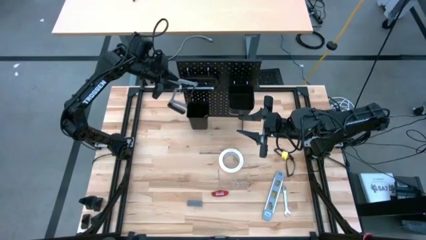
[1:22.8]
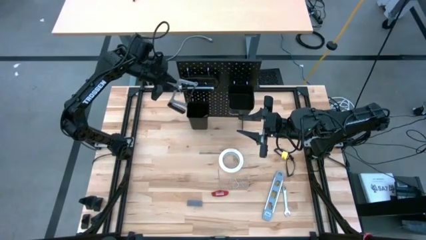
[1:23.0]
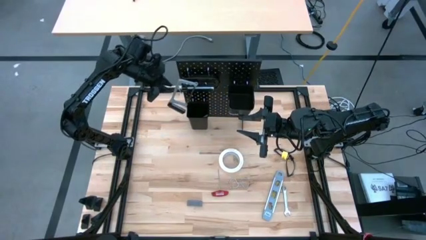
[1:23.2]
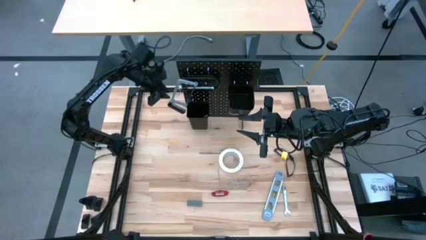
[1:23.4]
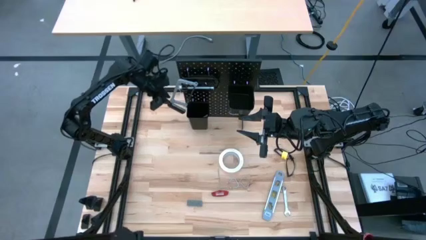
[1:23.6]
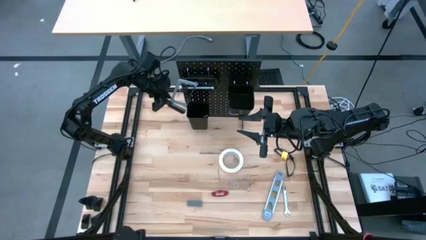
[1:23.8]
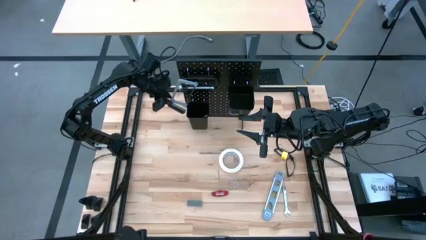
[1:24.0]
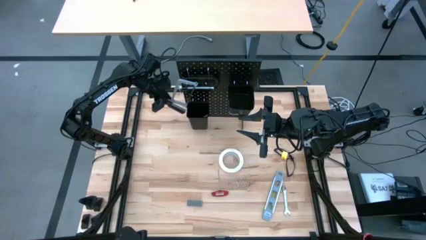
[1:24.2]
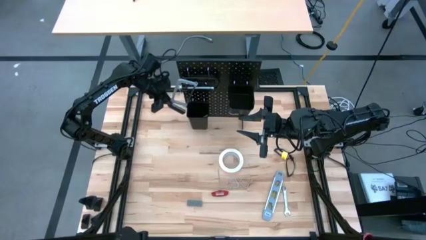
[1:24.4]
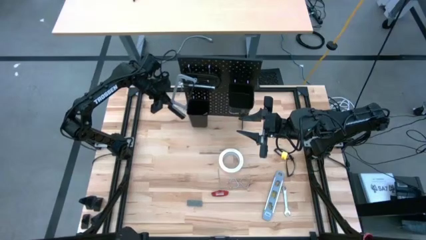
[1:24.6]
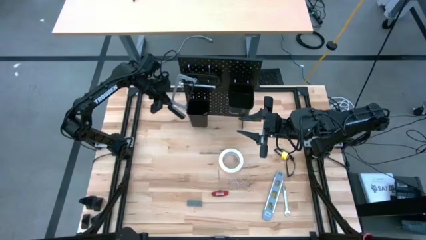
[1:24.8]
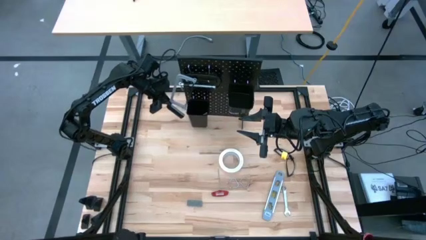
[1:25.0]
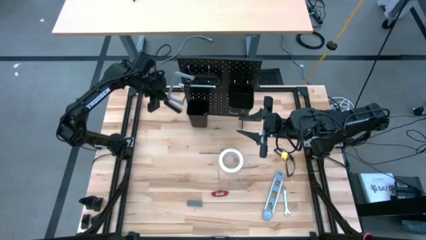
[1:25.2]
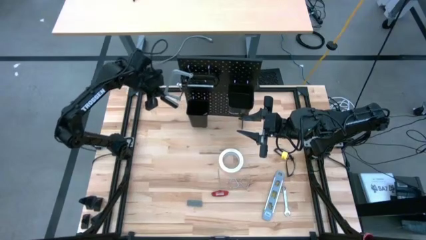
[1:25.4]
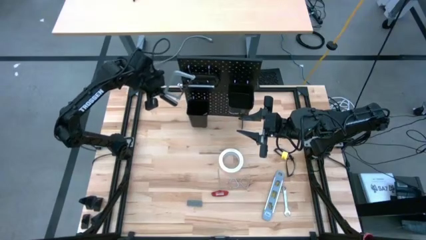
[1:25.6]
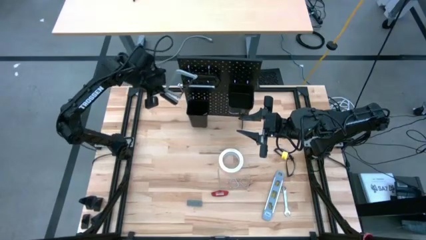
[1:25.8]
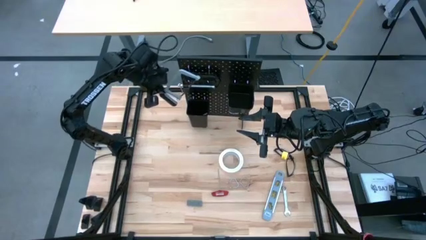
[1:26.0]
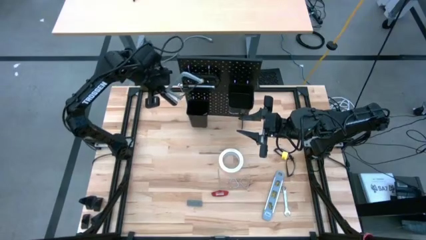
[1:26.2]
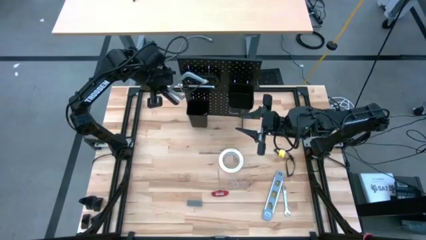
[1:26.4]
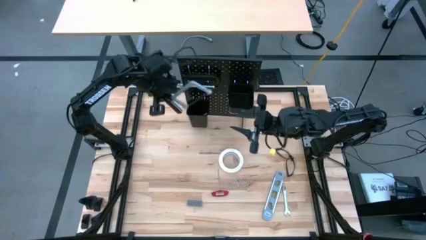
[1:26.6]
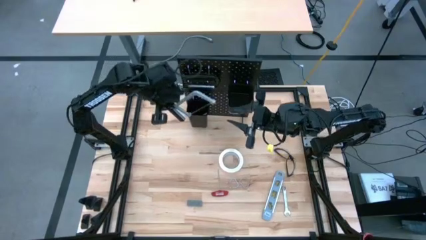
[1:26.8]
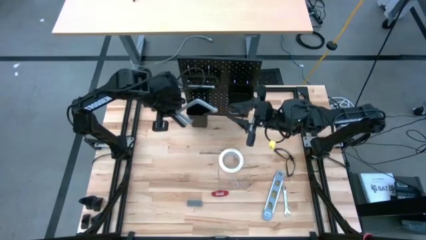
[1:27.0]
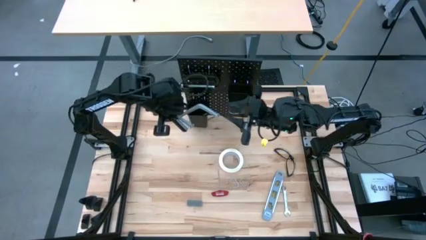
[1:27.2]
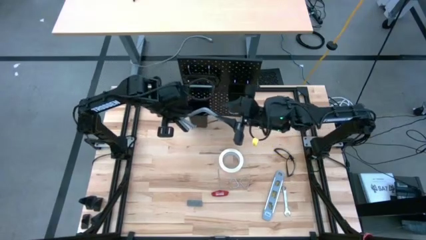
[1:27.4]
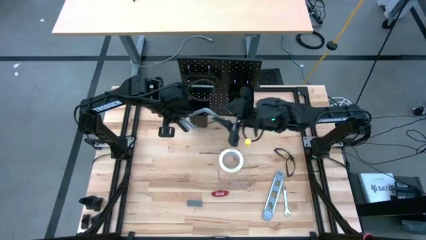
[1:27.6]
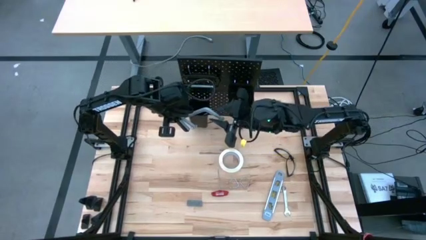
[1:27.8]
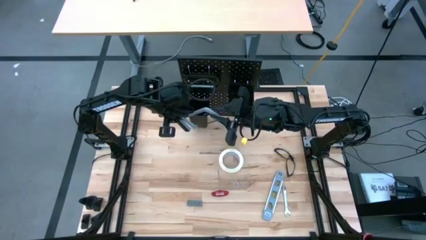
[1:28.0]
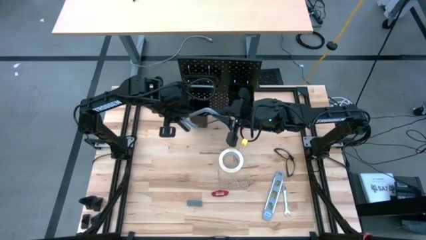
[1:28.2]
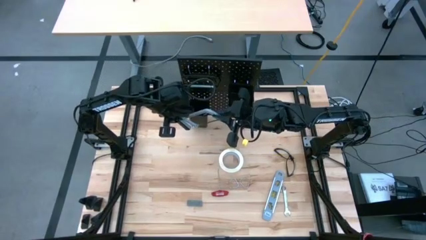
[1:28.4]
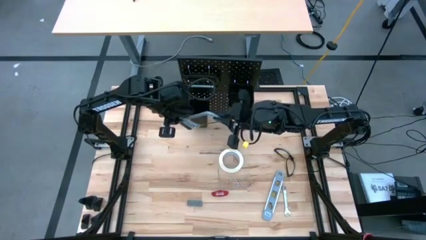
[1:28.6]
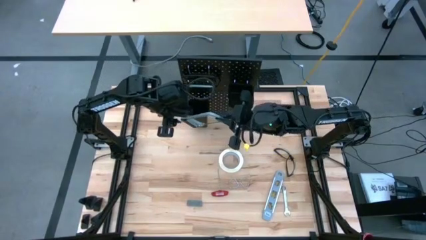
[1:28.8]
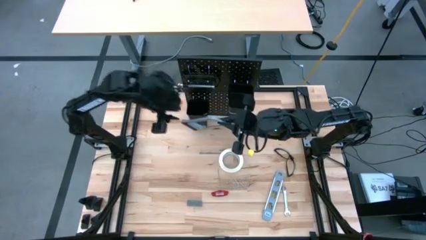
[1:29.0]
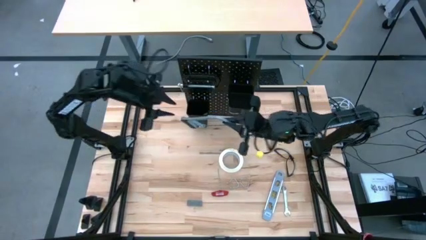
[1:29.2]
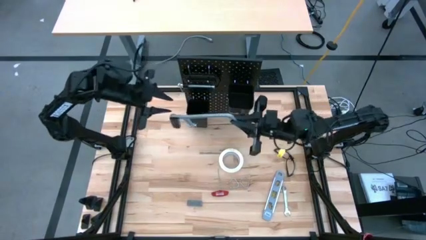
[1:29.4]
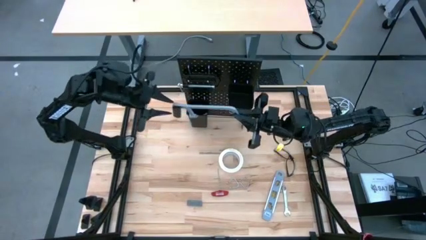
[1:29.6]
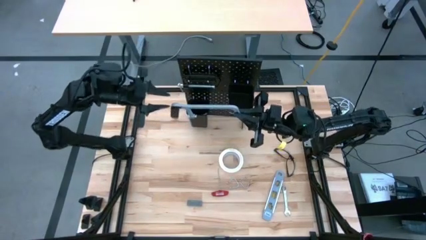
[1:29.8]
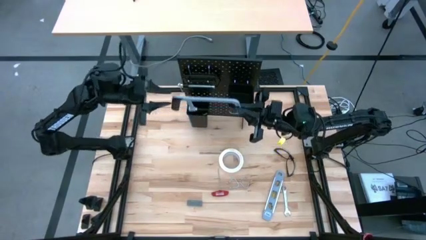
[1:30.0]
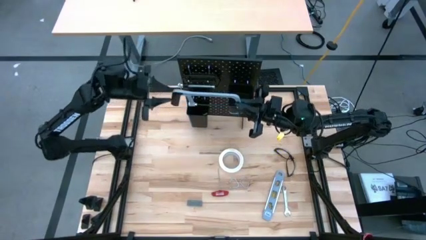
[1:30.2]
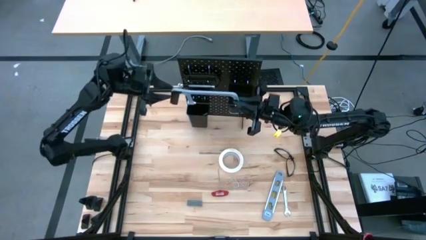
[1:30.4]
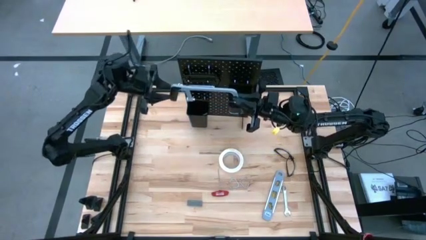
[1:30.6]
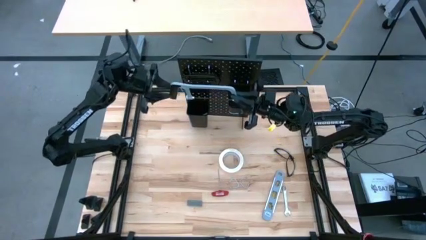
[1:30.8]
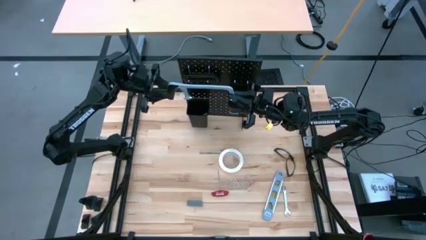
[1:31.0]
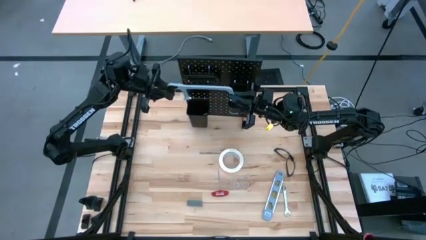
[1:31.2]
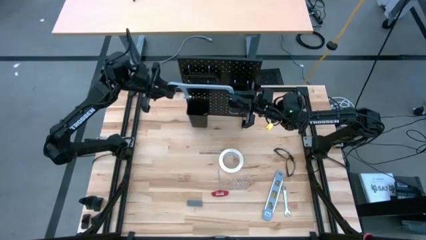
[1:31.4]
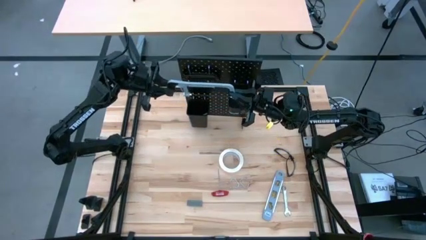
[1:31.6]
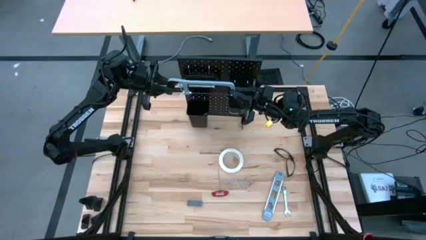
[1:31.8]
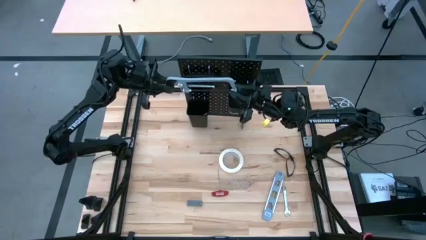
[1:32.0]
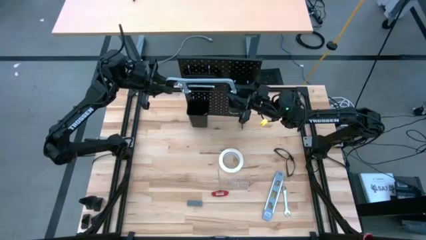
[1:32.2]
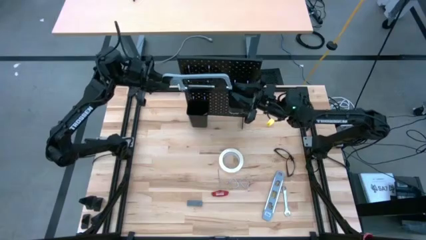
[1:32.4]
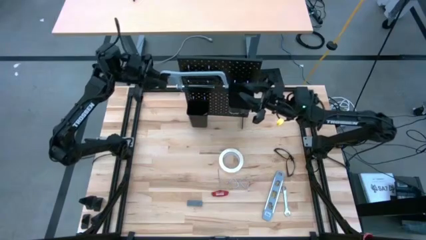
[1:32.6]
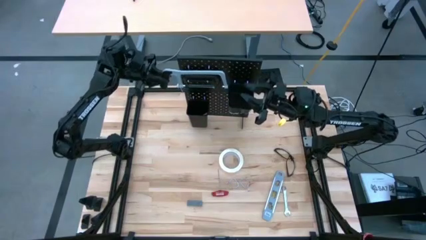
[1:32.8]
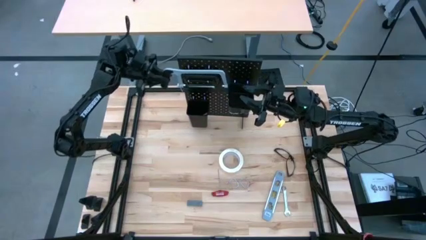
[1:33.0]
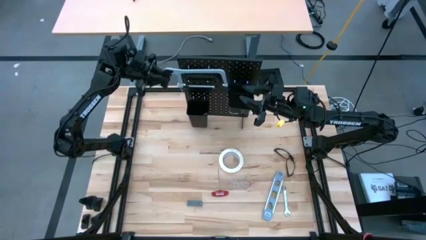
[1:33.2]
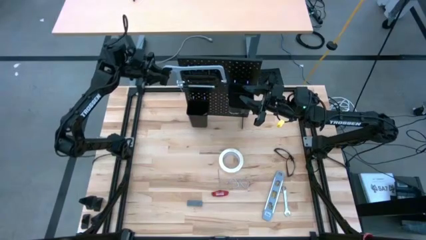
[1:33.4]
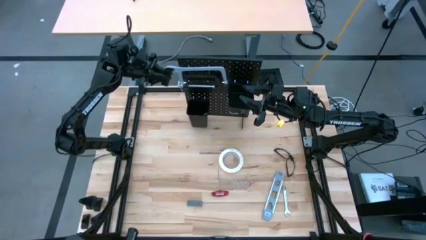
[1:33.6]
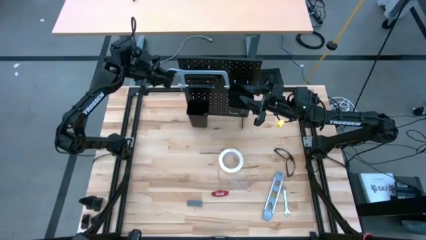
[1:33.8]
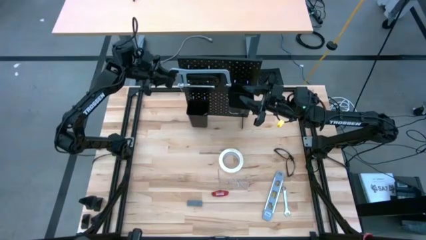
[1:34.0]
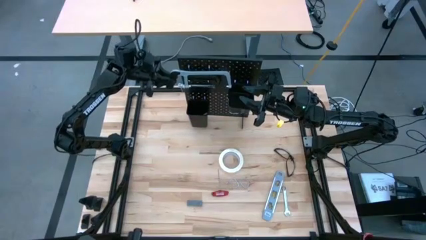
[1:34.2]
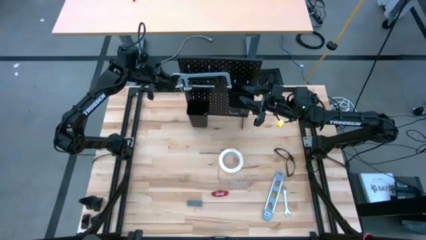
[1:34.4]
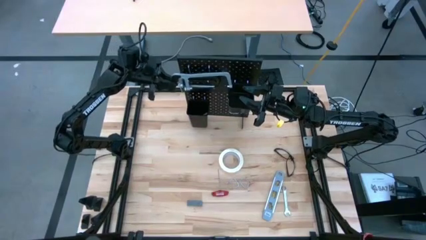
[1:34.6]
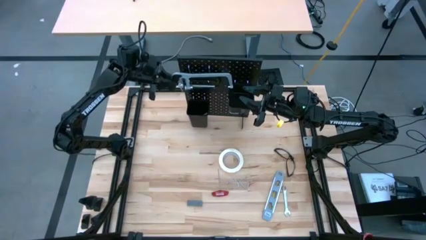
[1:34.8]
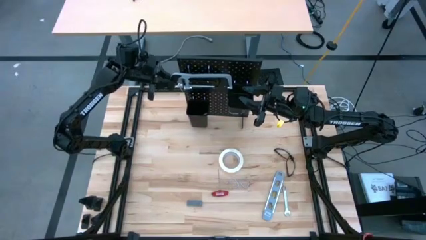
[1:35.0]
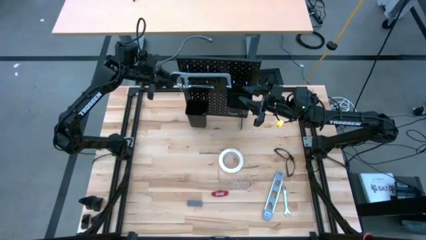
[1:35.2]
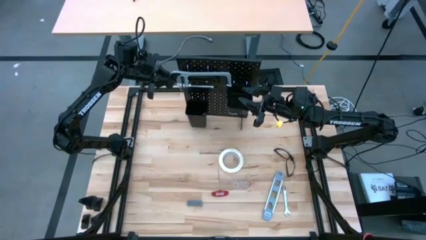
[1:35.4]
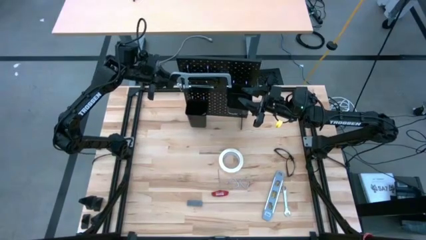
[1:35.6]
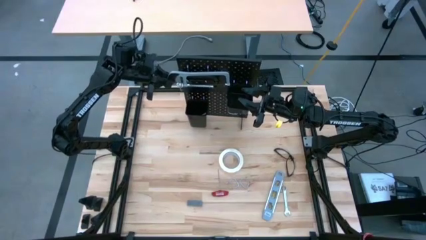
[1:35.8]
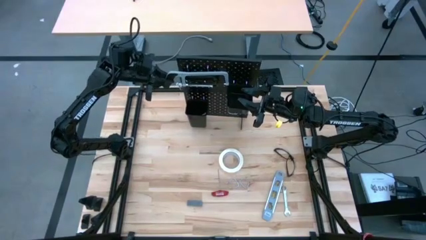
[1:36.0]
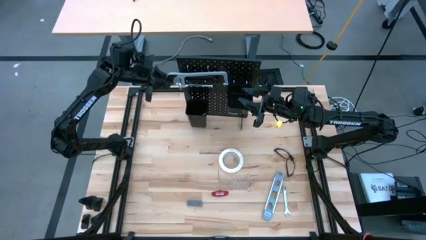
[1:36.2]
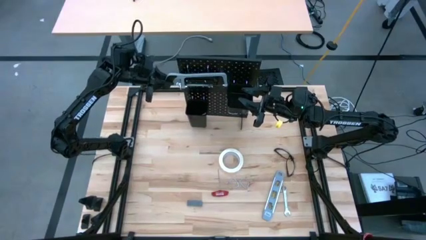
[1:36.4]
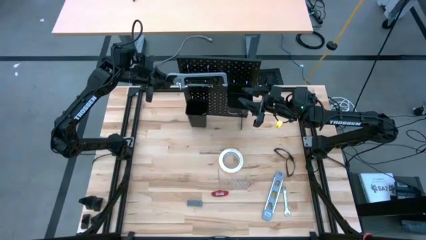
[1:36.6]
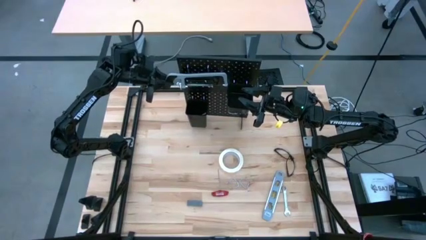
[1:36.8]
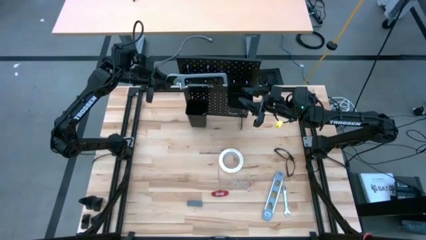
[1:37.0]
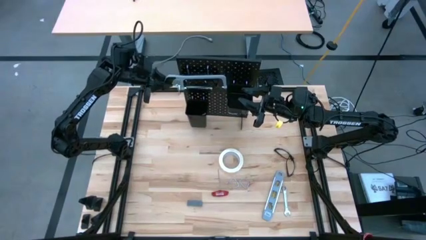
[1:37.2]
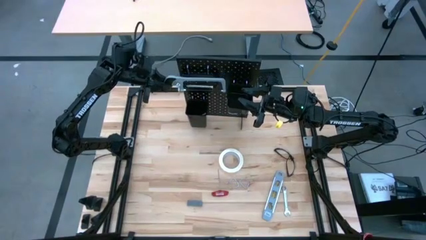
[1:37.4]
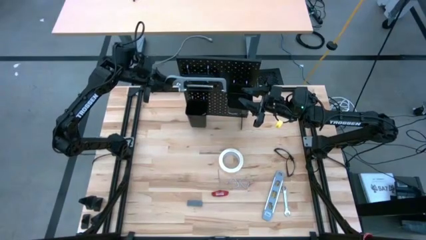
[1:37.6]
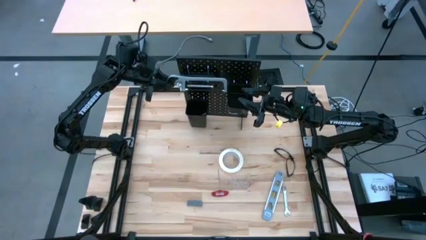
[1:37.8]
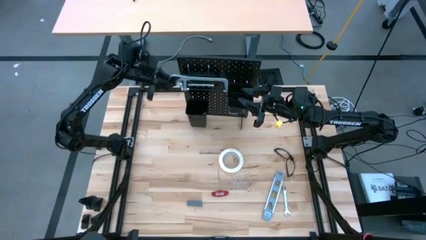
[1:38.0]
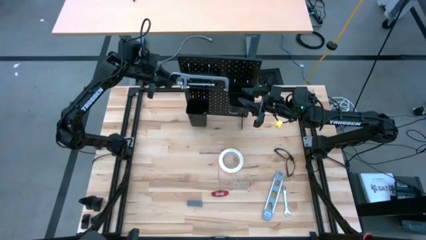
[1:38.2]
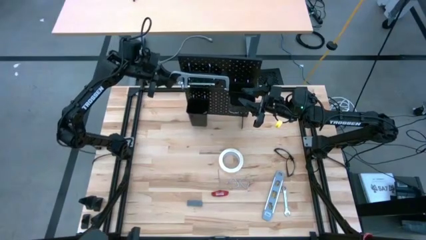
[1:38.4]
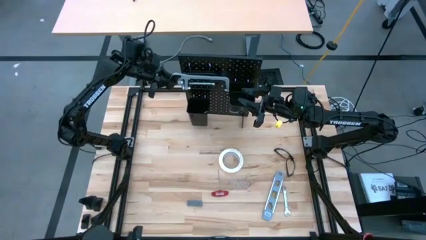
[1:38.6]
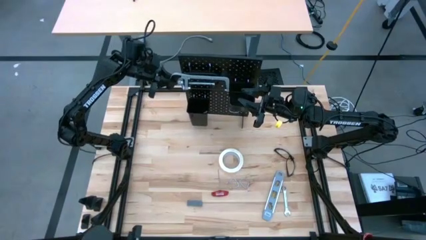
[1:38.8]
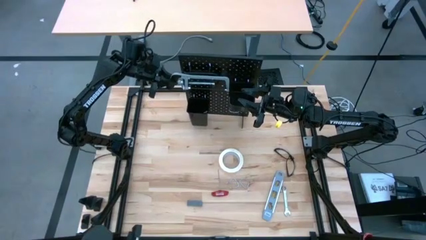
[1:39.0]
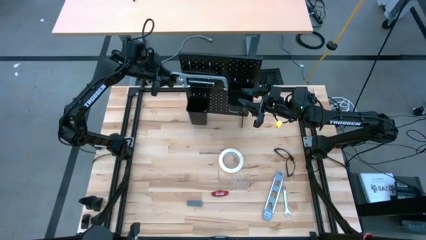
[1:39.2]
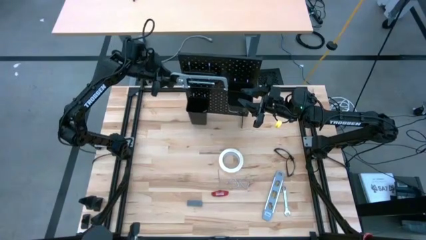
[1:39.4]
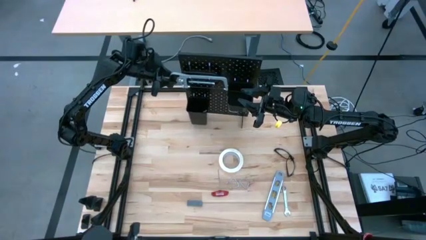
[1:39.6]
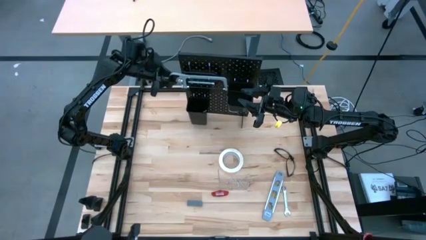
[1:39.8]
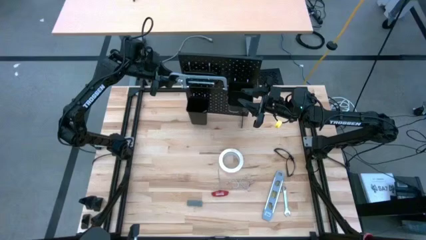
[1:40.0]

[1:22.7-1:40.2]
Task: Hang tools onto peg board
Hang the gray hacksaw on the black peg board
